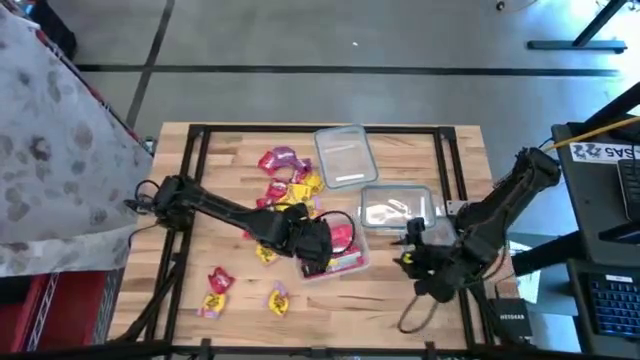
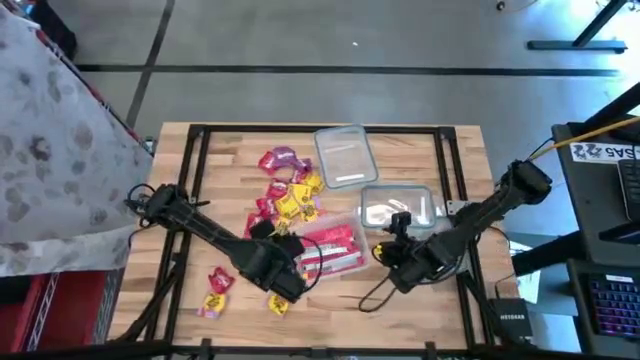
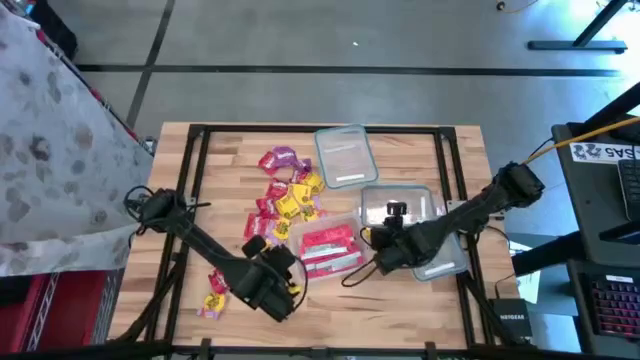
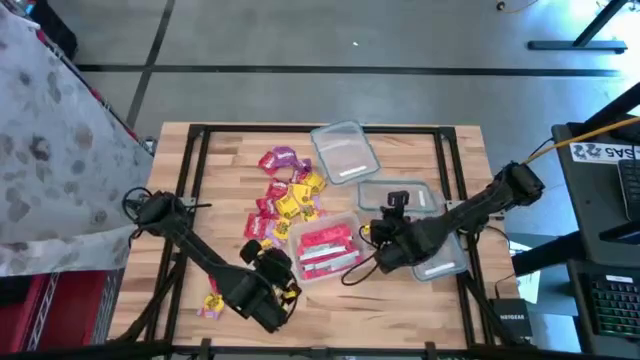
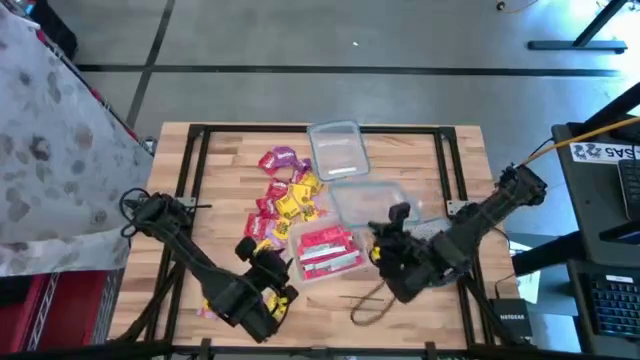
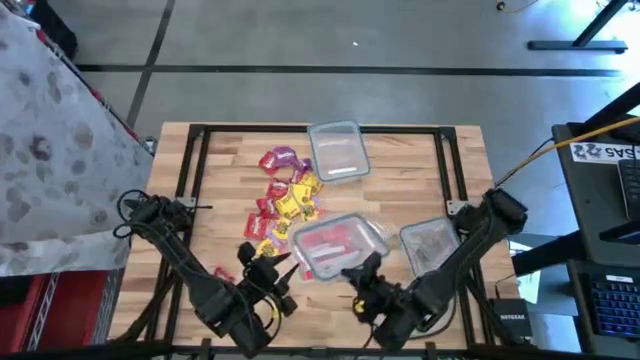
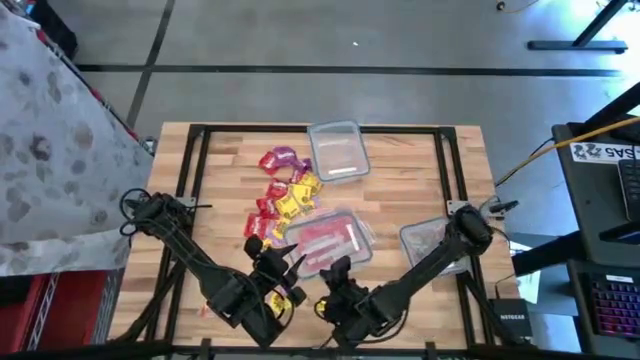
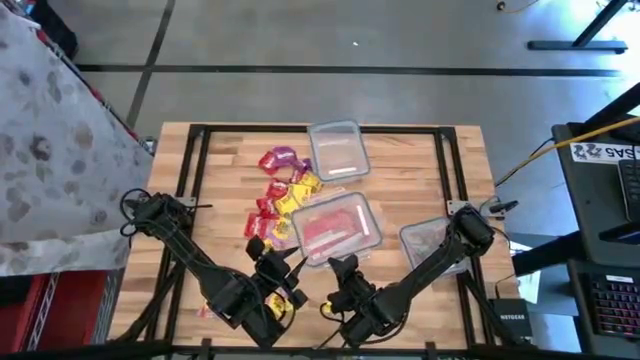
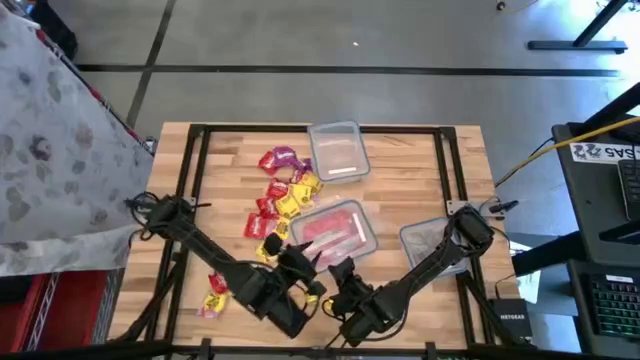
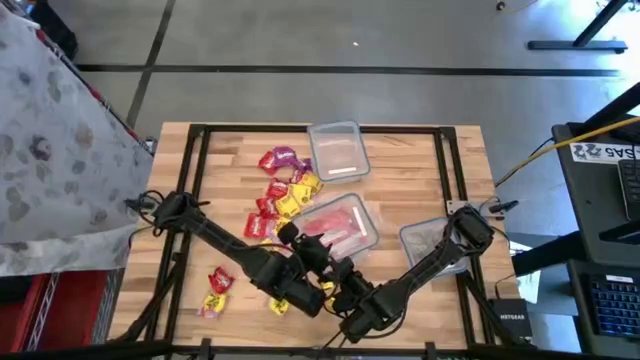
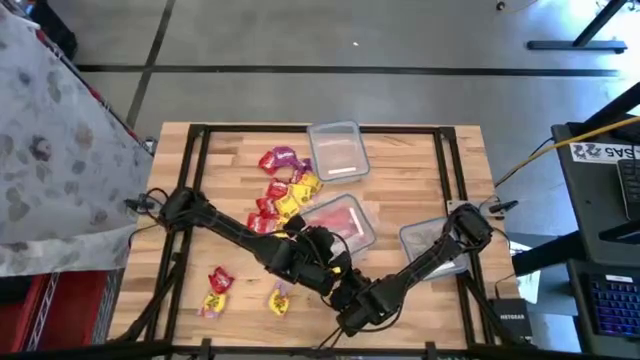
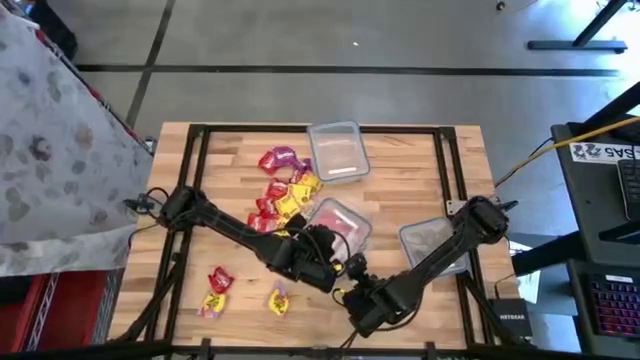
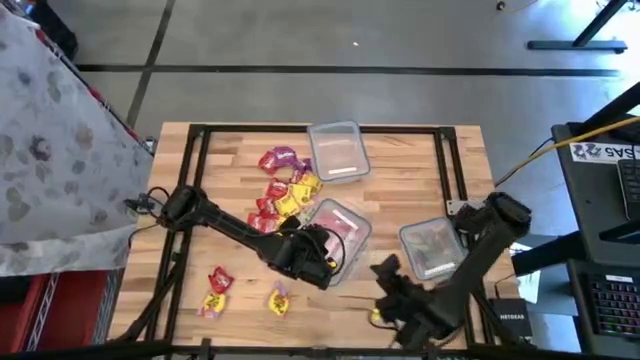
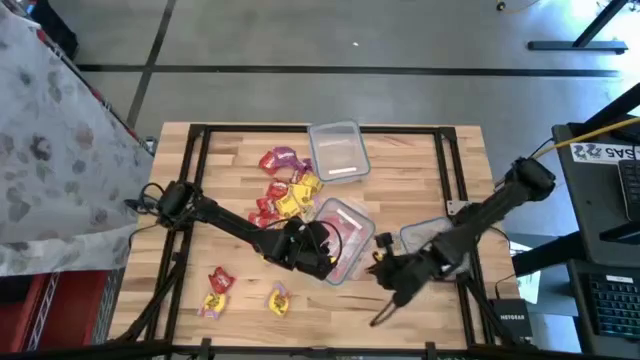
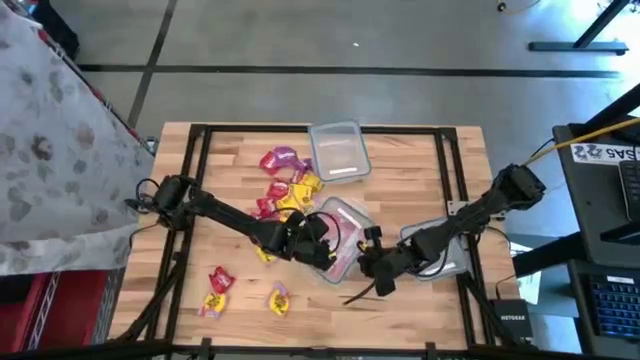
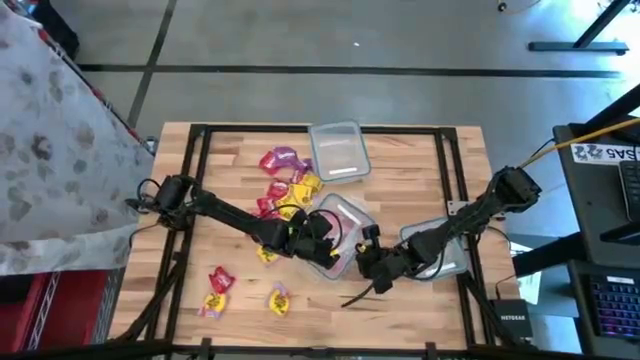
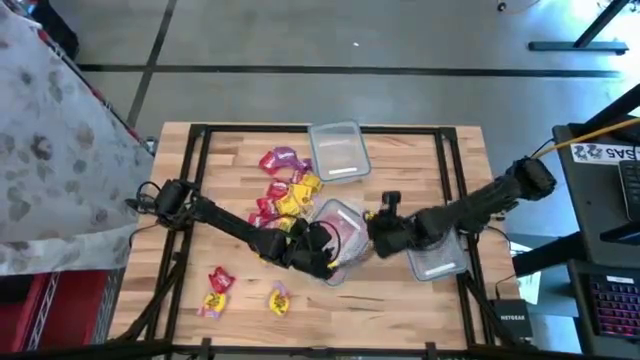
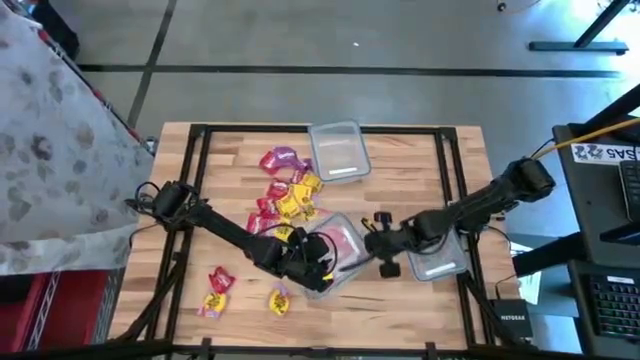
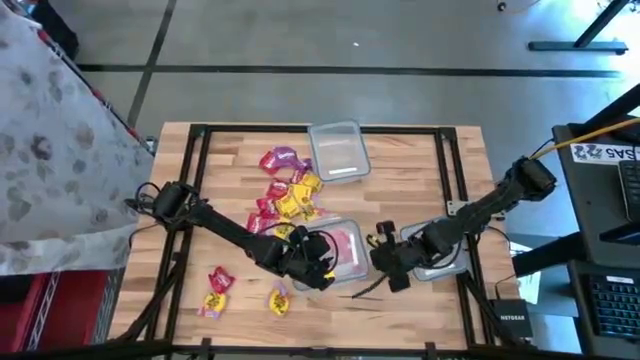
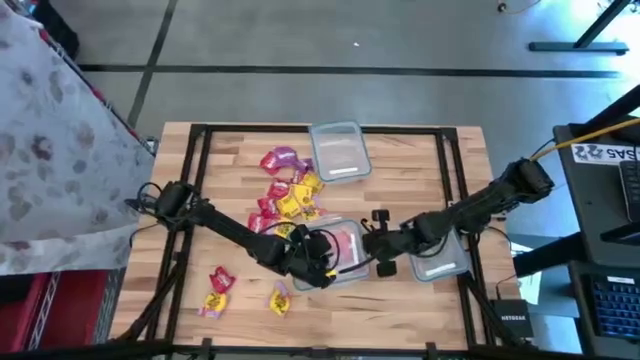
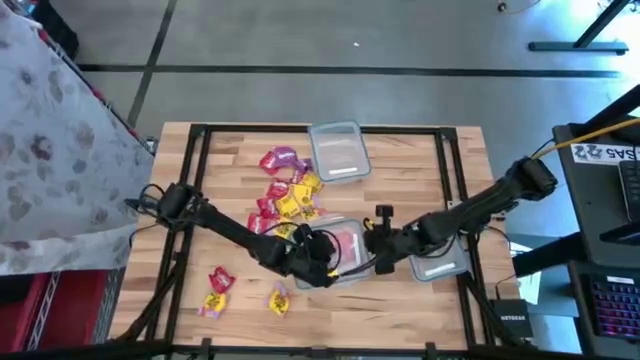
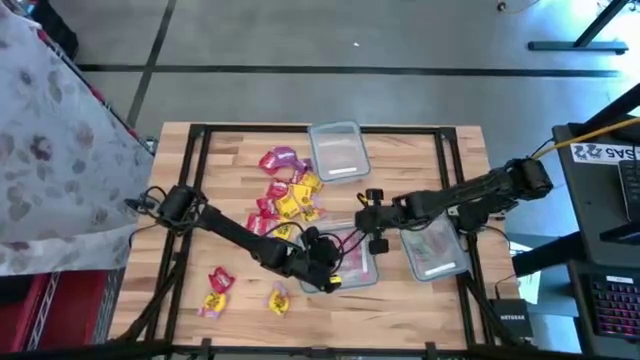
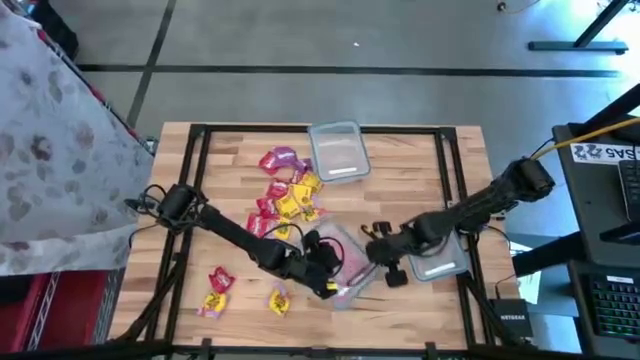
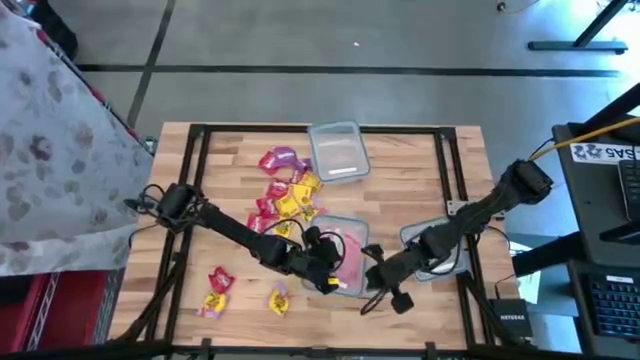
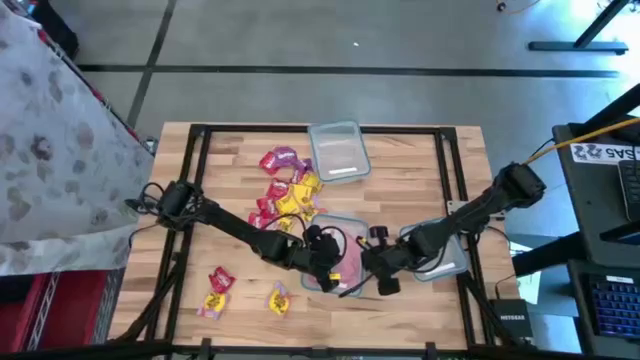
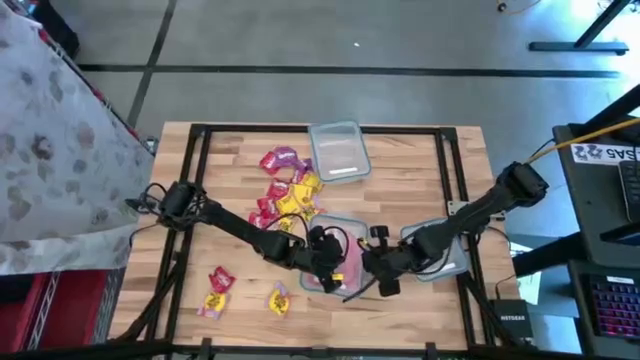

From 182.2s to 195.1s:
Task: Sort candy
Close the top rectangular transparent food container

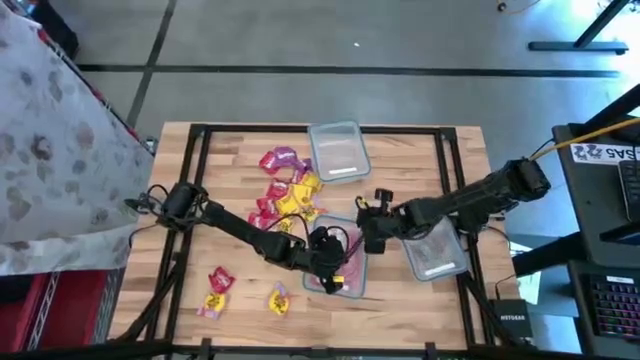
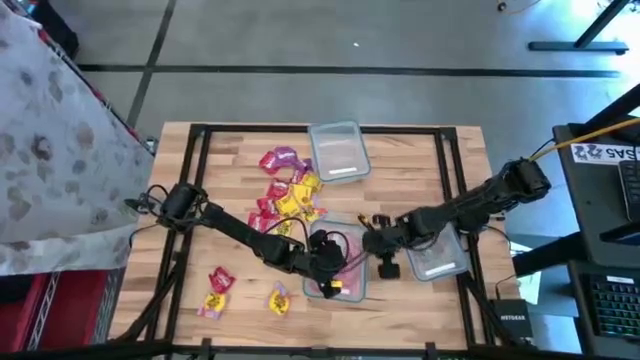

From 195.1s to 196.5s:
Close the top rectangular transparent food container

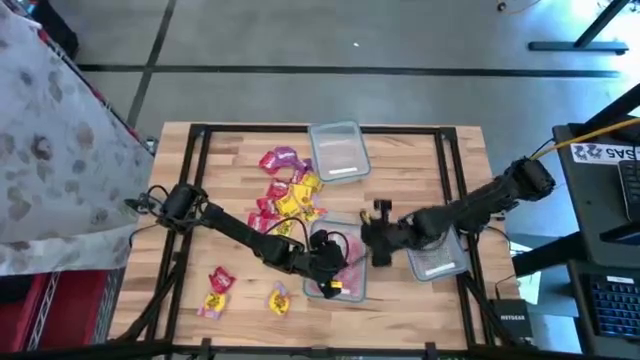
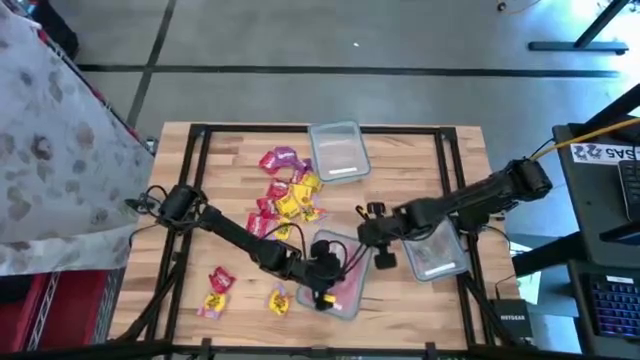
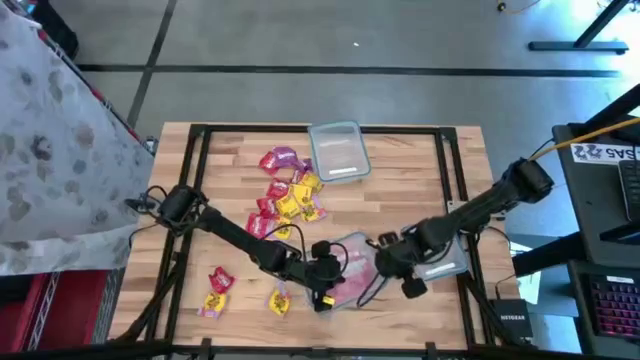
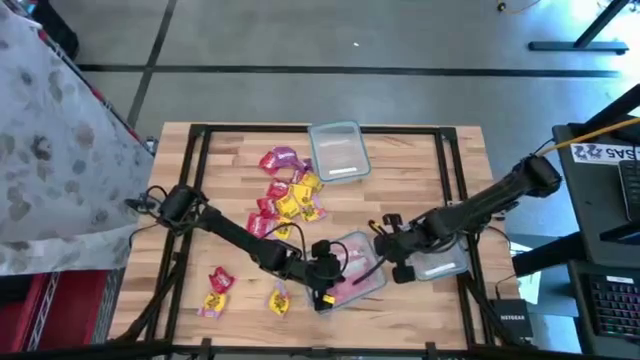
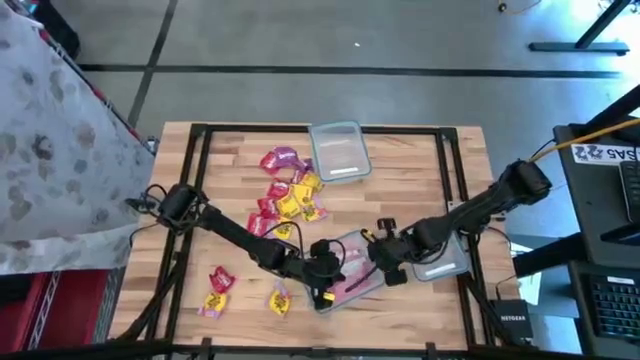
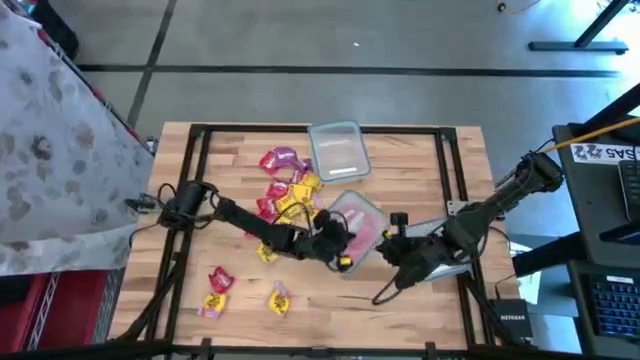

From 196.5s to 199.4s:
Close the top rectangular transparent food container

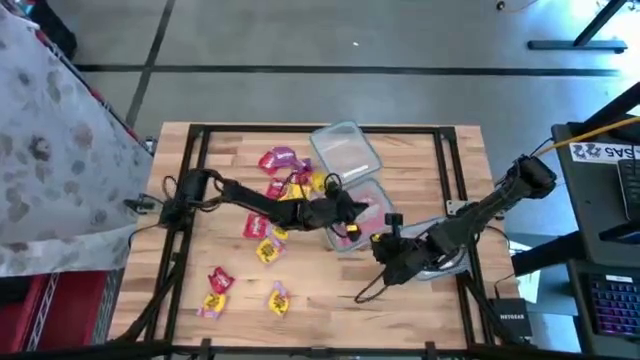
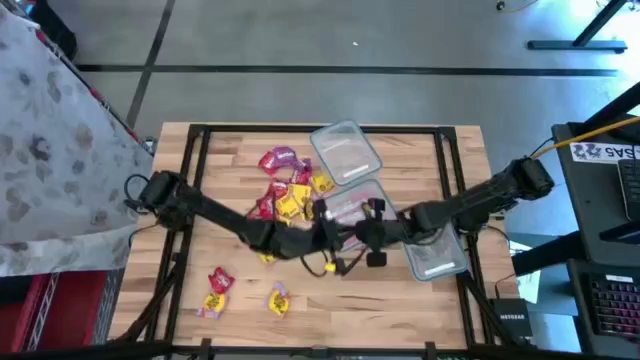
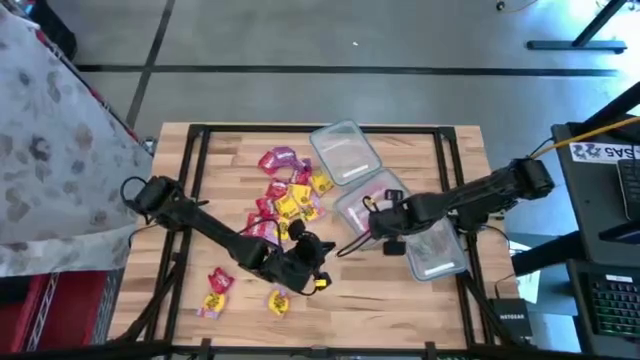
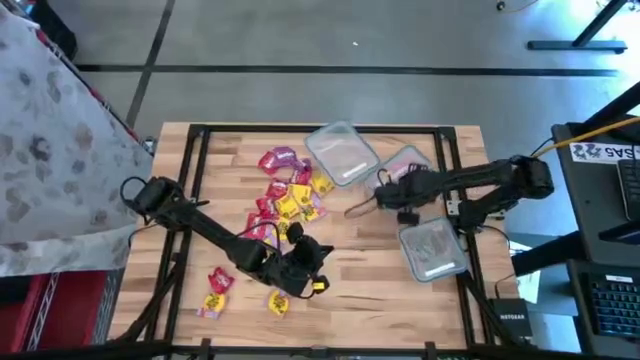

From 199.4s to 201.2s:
Move the top rectangular transparent food container to the top right of the table

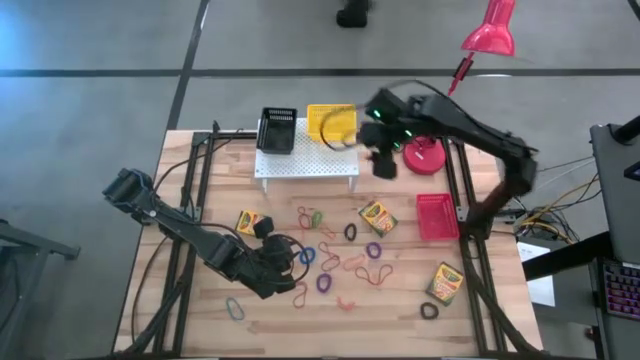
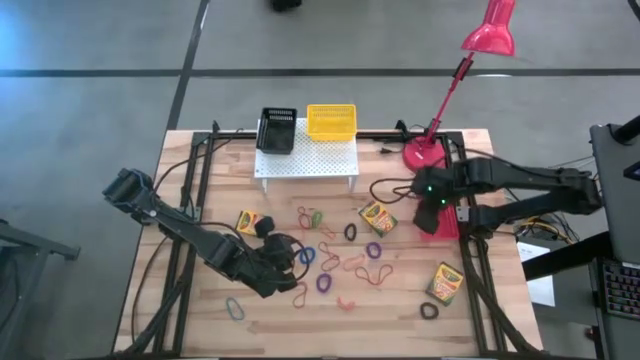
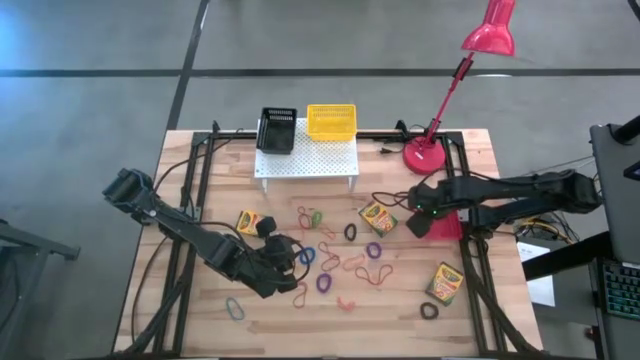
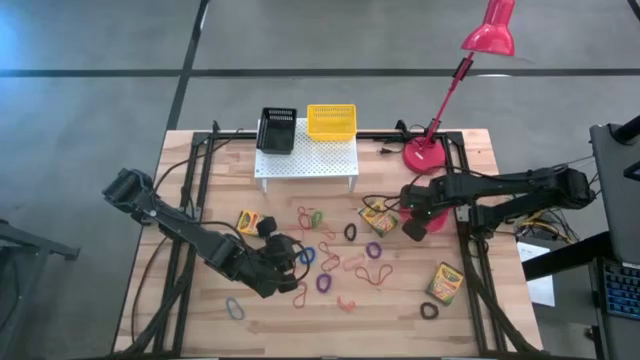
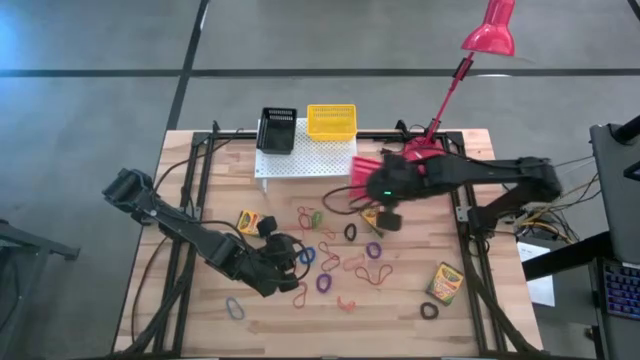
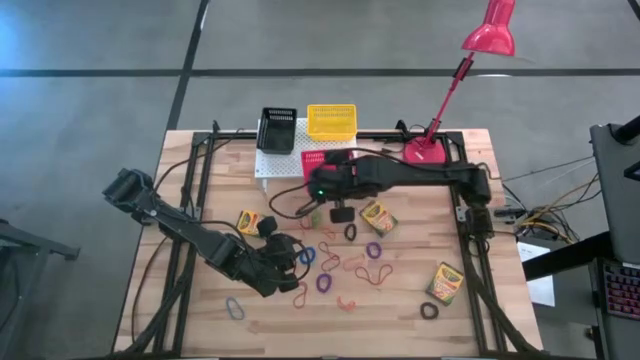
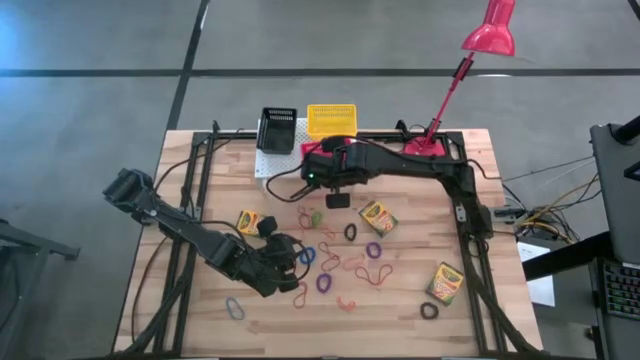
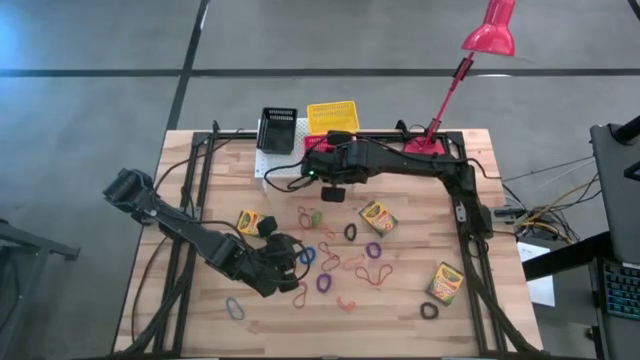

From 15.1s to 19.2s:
Task: Pick & Place Office Desk Supplies
Put the red bin on the shelf
